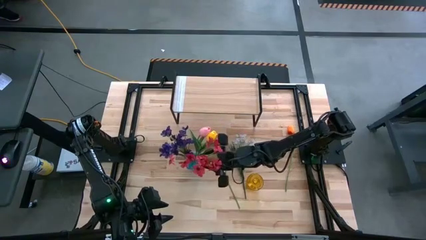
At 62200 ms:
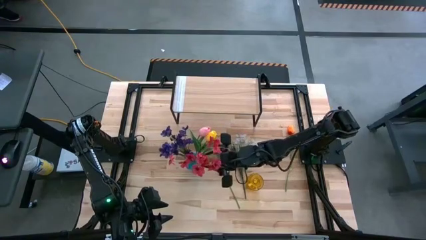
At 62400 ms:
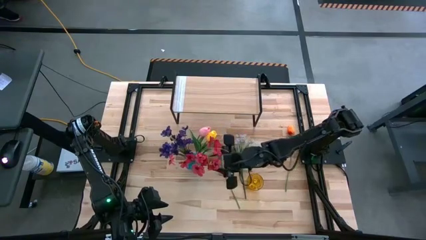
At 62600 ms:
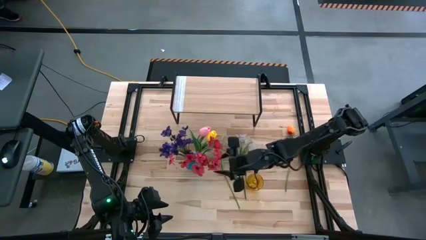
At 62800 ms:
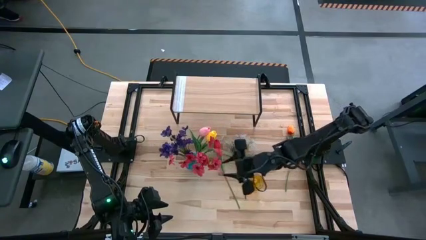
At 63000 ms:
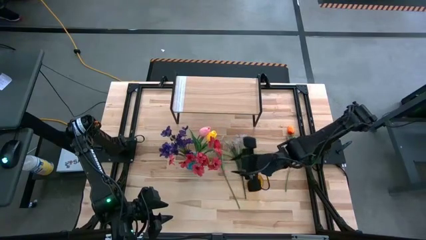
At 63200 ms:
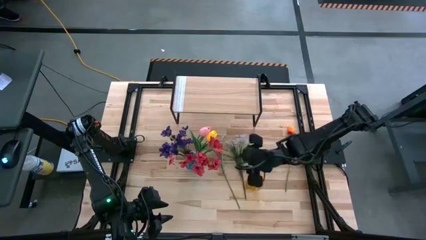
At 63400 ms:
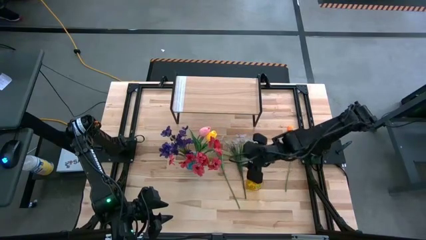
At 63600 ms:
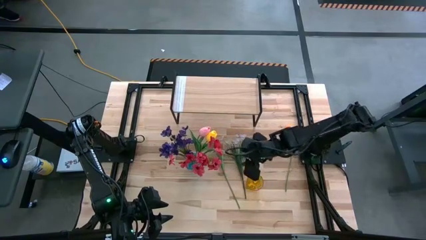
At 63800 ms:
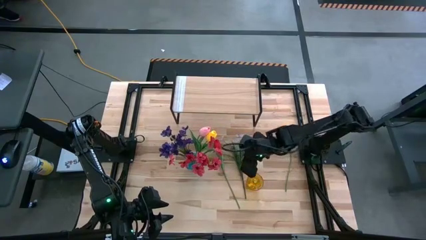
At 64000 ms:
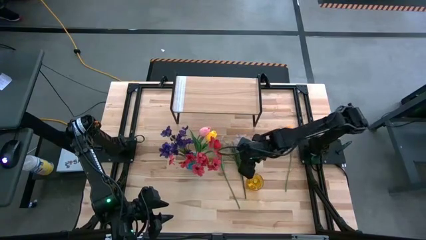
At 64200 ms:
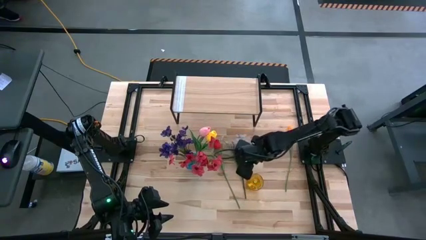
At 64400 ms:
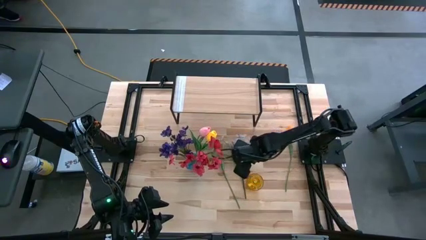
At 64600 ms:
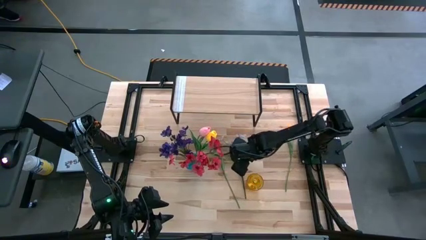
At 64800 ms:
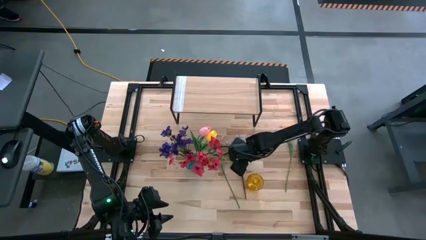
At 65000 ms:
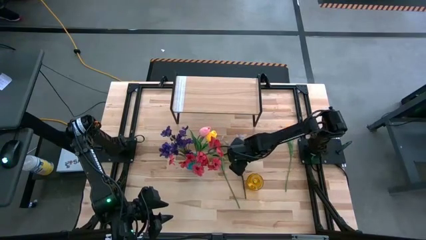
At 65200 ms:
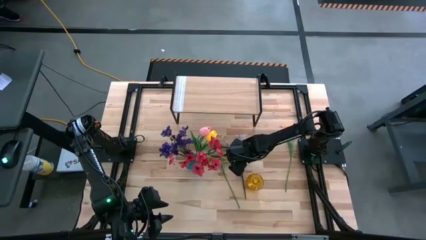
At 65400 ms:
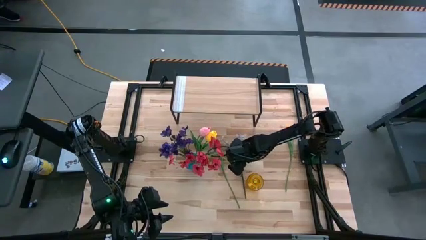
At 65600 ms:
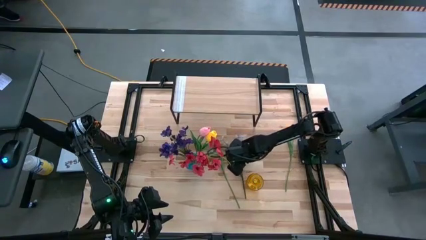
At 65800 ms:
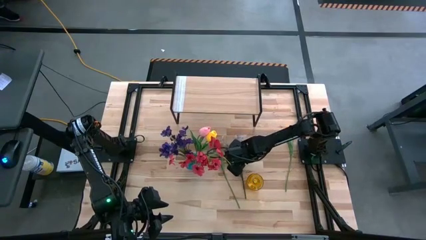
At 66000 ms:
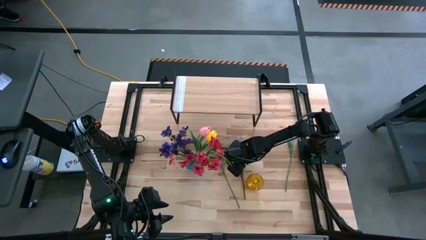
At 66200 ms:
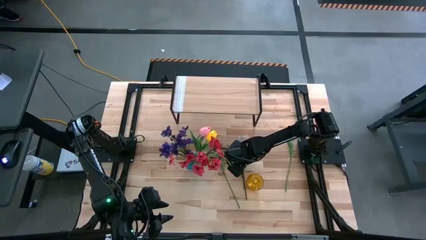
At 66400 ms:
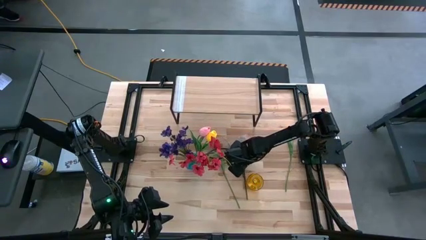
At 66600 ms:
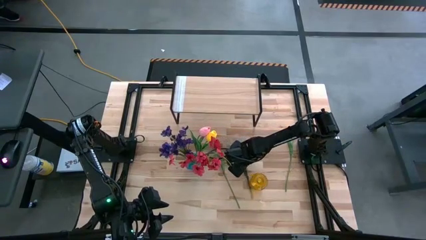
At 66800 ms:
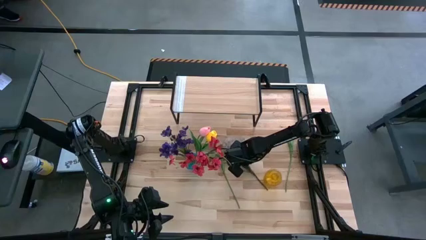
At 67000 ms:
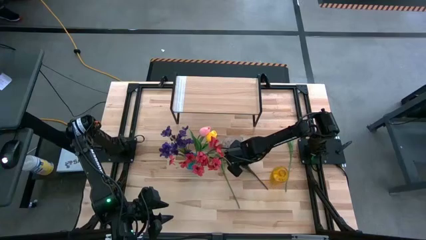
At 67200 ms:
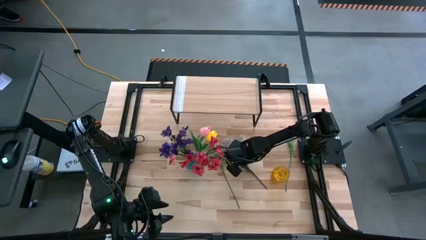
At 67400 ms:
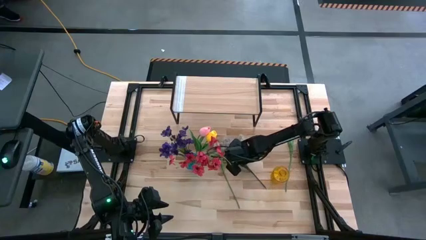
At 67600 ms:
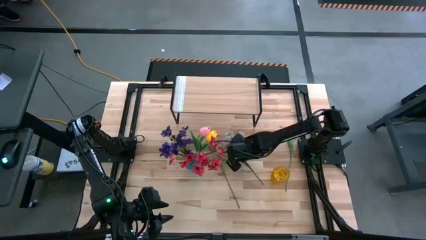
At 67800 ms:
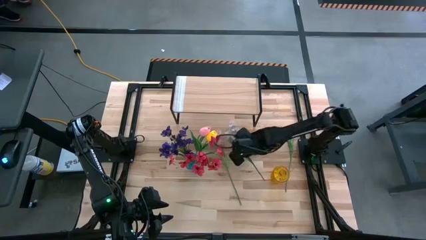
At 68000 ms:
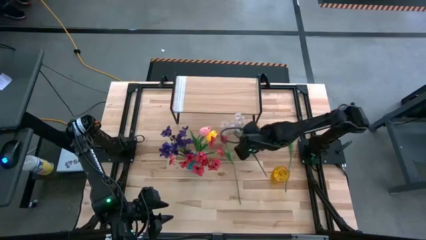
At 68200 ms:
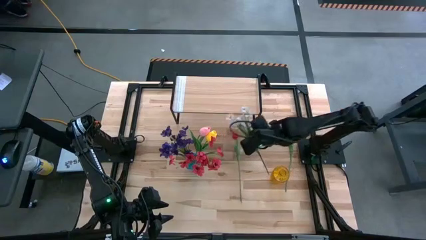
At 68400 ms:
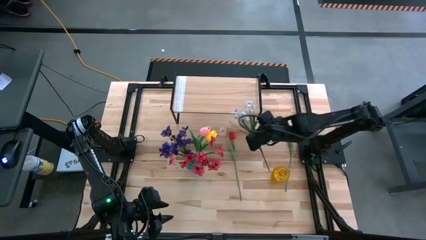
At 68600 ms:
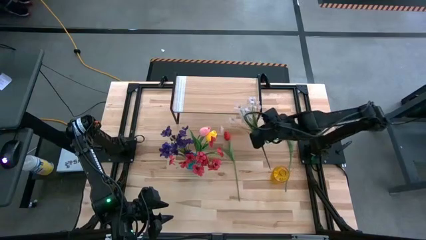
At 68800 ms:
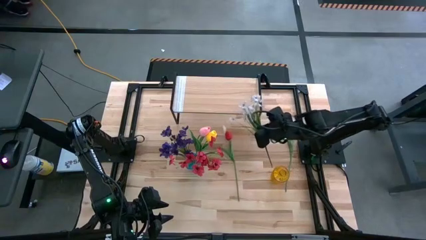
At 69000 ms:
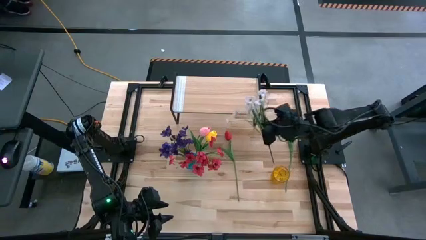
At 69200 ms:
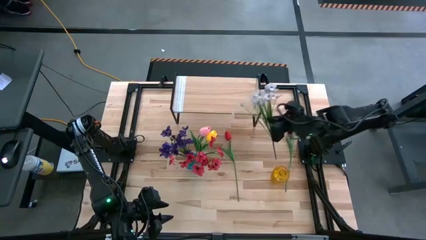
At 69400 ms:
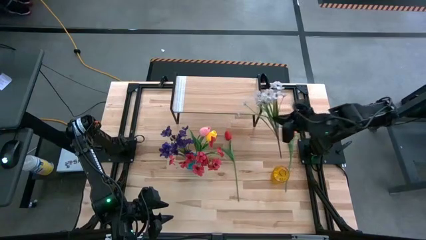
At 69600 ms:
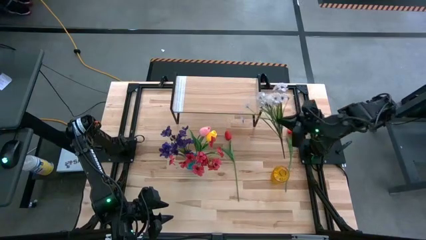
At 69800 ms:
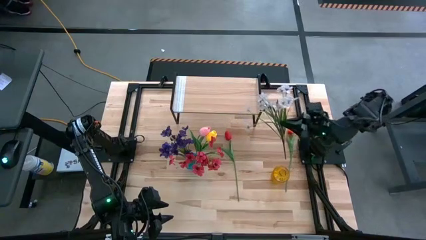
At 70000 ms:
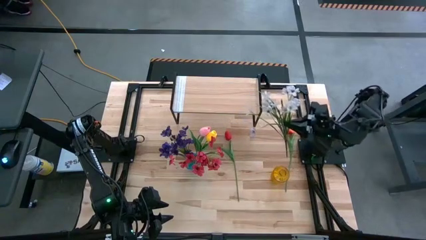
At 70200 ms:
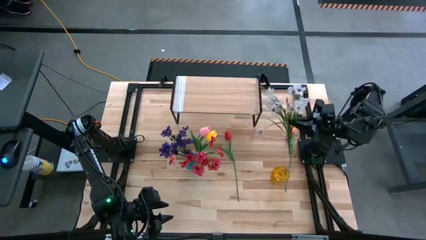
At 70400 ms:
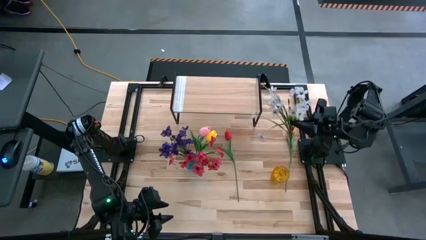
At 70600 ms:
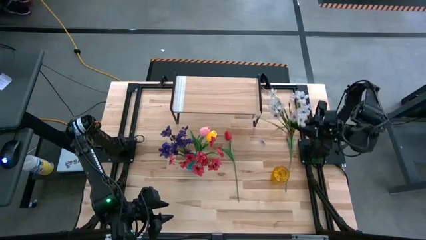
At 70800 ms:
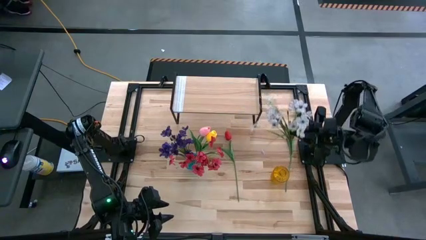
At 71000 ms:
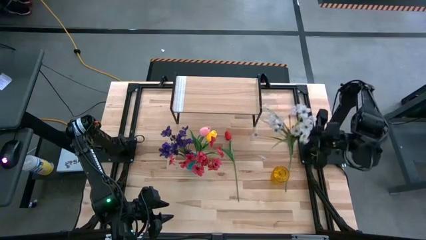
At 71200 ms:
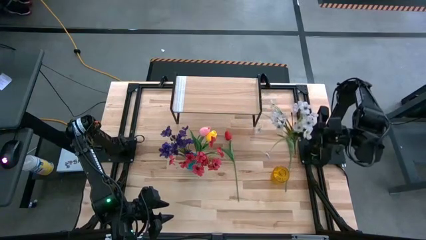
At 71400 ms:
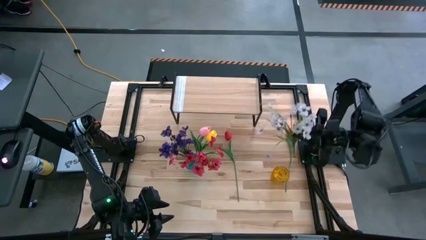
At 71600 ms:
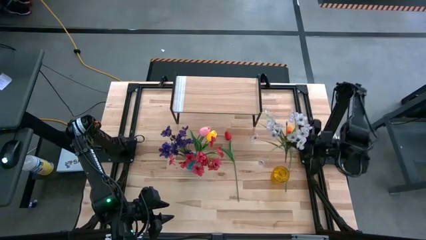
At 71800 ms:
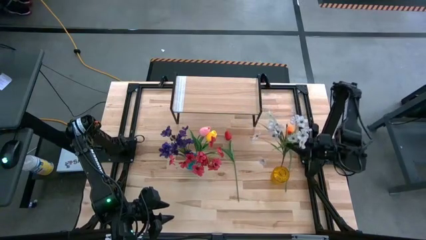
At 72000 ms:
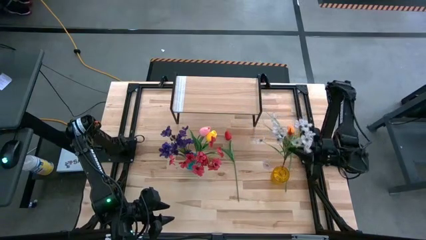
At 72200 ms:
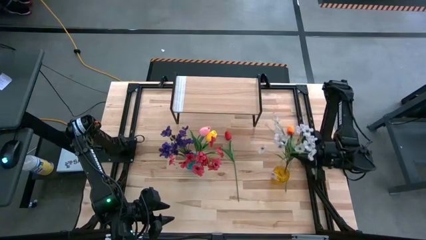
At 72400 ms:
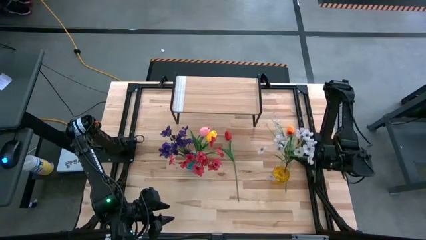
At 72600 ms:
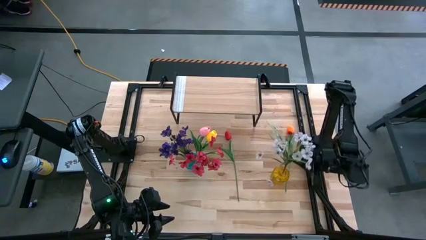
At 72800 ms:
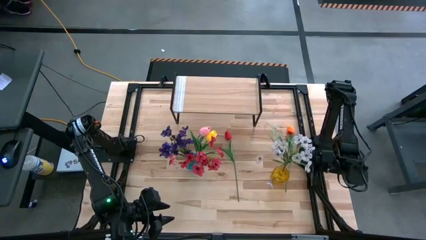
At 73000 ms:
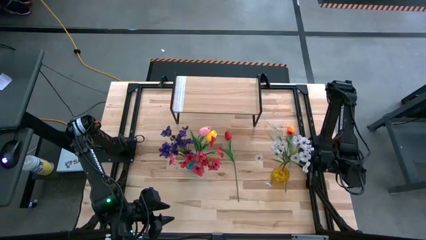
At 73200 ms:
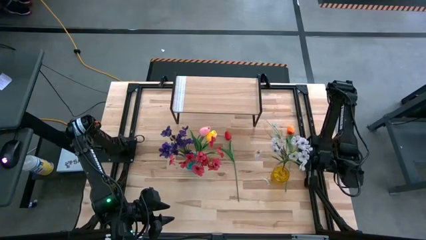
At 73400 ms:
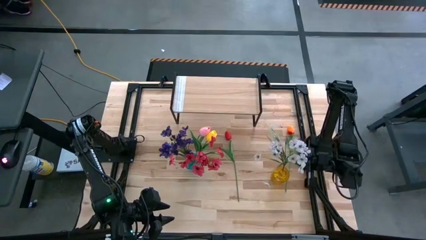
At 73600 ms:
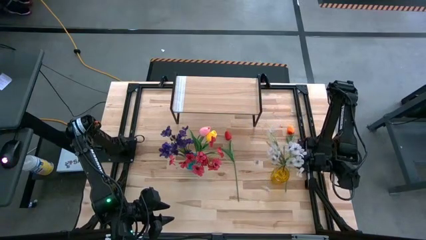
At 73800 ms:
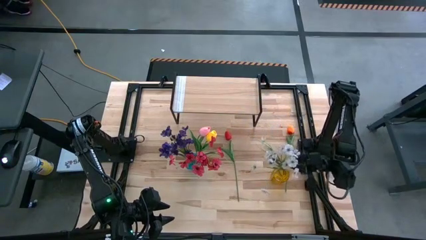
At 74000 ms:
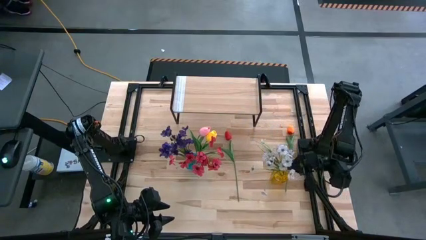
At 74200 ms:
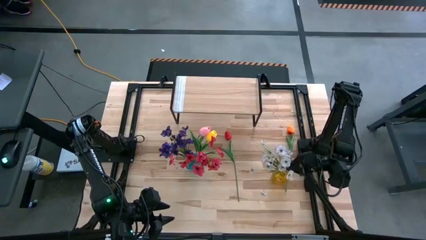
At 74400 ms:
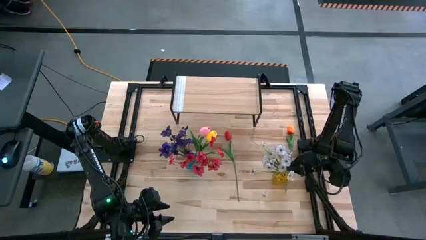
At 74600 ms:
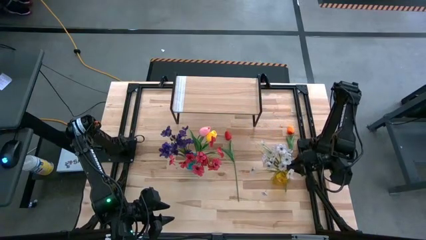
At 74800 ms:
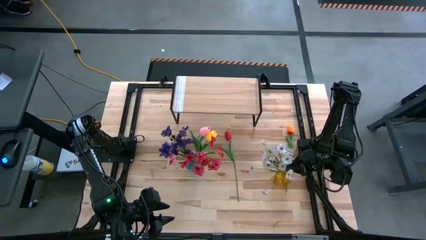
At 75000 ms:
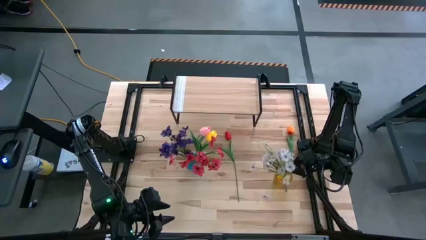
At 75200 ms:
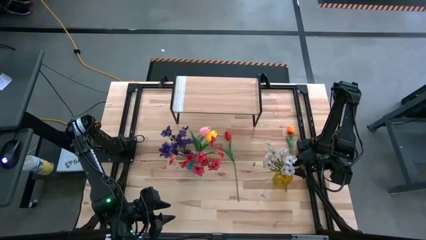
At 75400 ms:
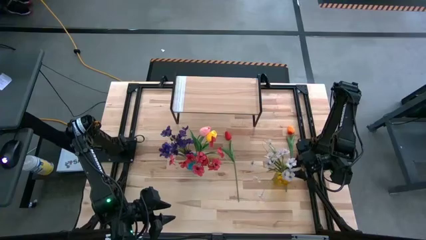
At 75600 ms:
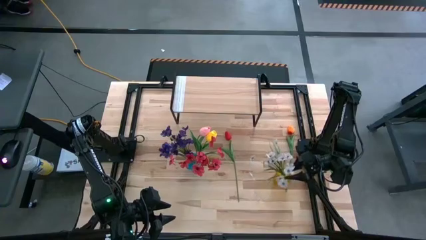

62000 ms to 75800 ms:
Task: Pick and place flowers into a vace then onto a shelf
Put the white flowers into the yellow vase
